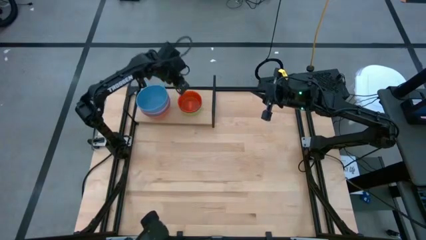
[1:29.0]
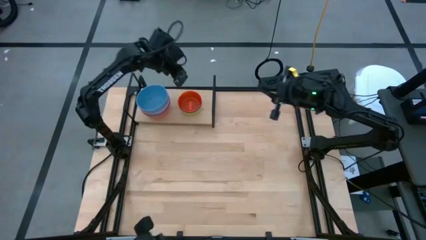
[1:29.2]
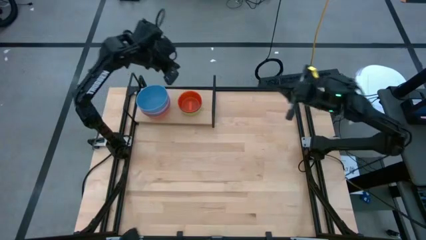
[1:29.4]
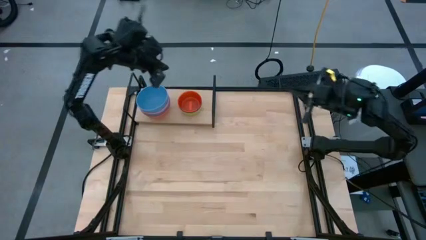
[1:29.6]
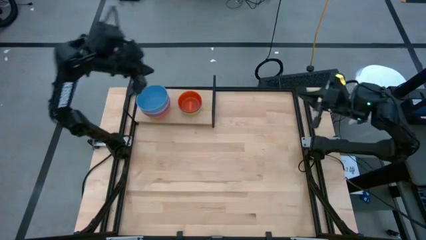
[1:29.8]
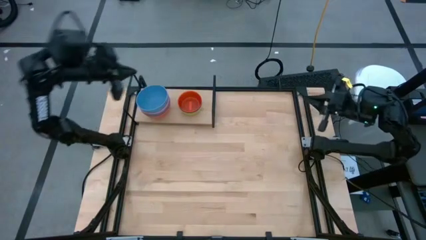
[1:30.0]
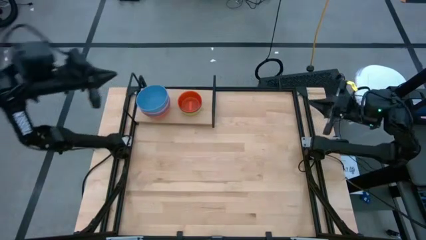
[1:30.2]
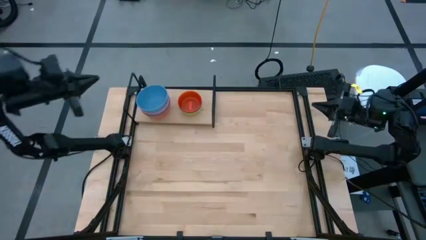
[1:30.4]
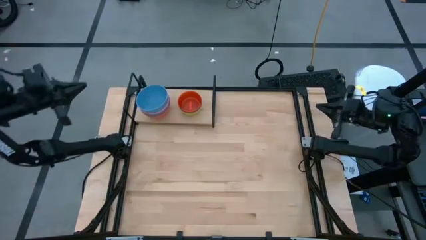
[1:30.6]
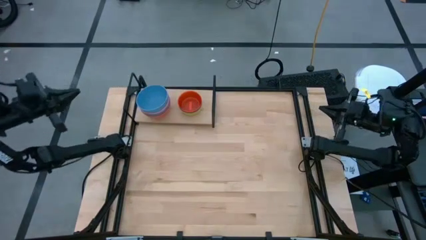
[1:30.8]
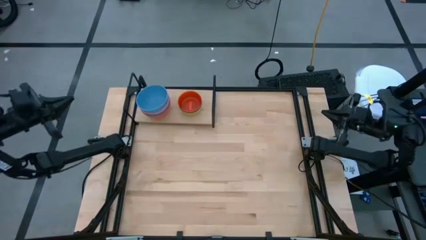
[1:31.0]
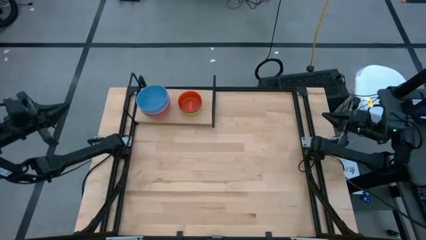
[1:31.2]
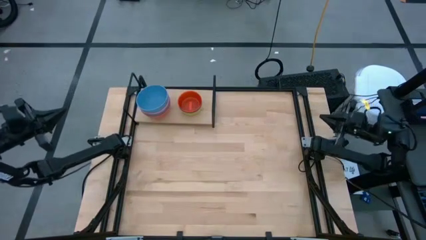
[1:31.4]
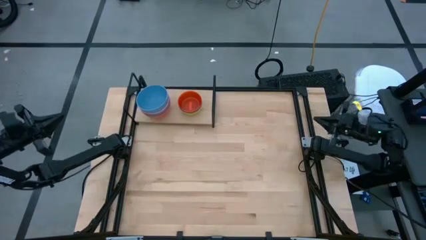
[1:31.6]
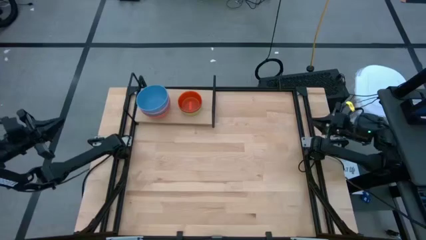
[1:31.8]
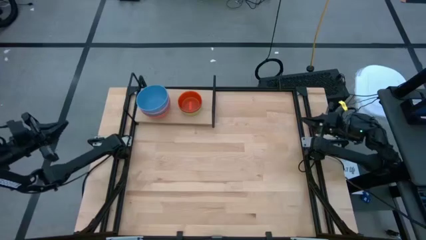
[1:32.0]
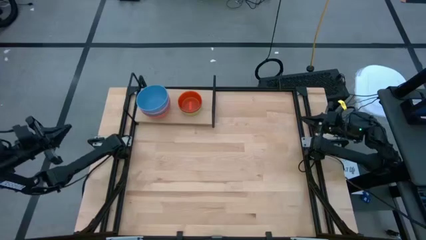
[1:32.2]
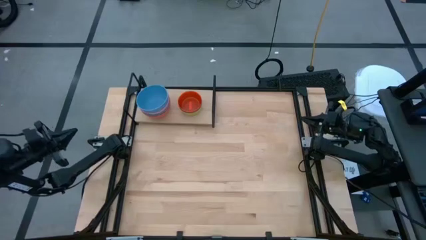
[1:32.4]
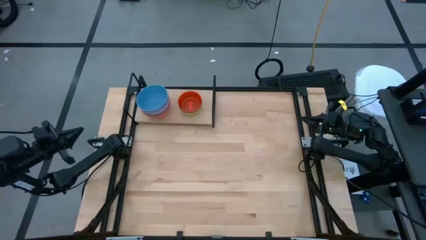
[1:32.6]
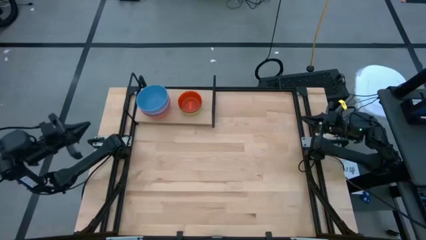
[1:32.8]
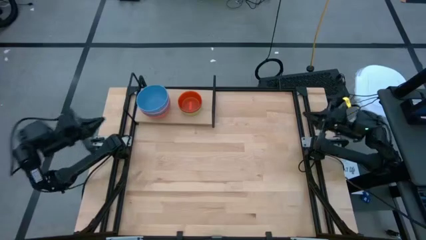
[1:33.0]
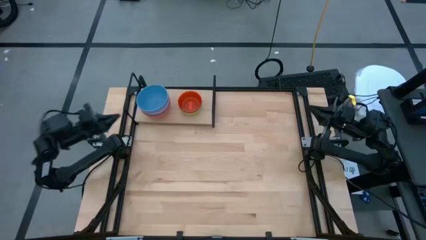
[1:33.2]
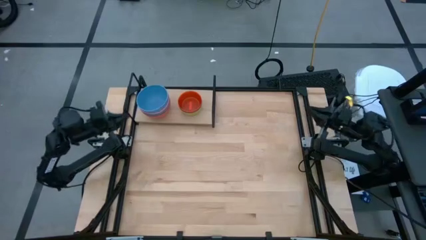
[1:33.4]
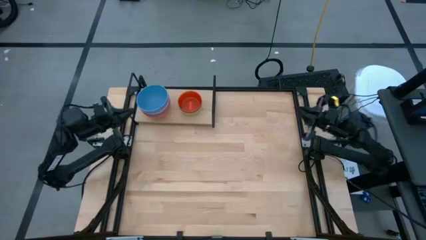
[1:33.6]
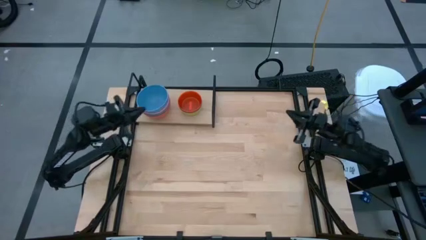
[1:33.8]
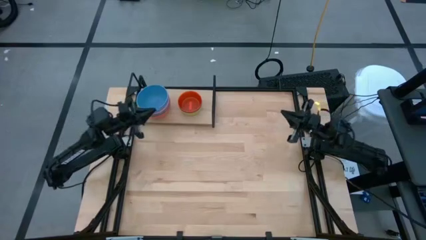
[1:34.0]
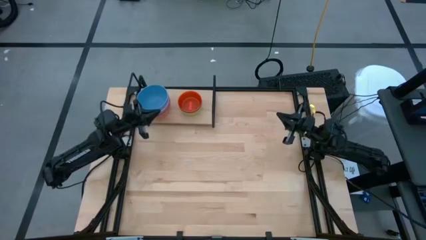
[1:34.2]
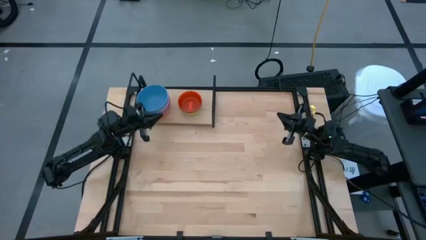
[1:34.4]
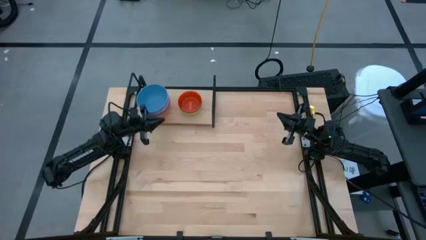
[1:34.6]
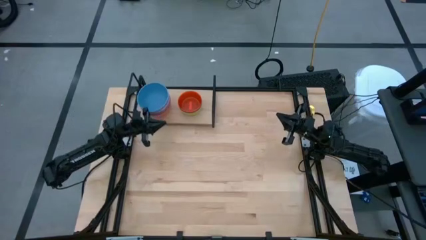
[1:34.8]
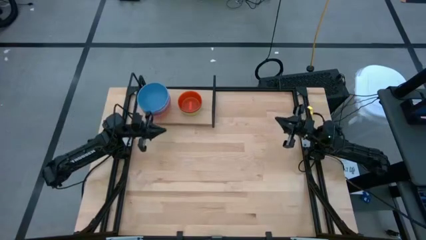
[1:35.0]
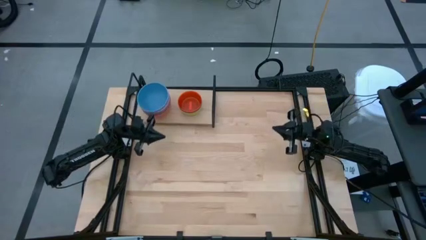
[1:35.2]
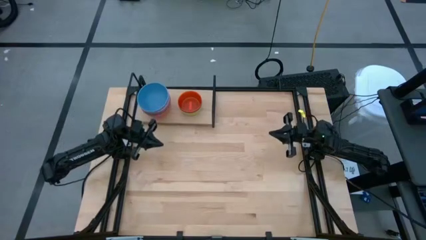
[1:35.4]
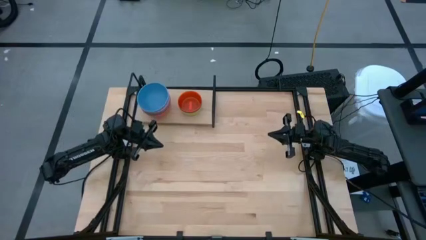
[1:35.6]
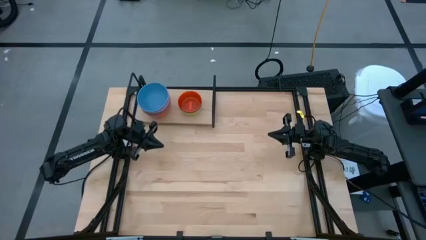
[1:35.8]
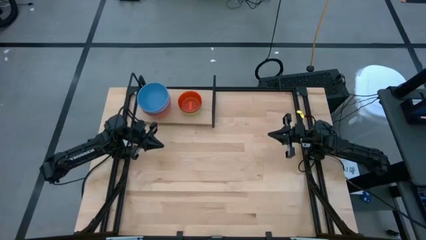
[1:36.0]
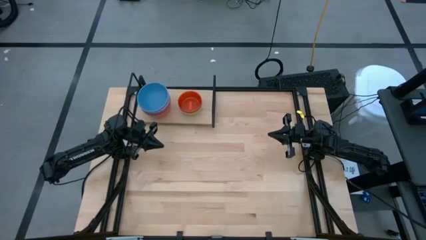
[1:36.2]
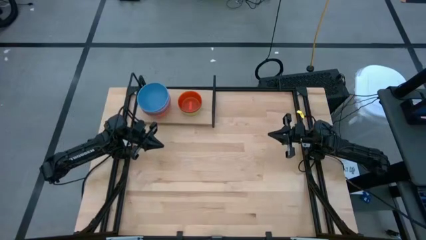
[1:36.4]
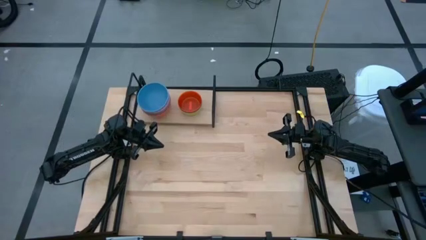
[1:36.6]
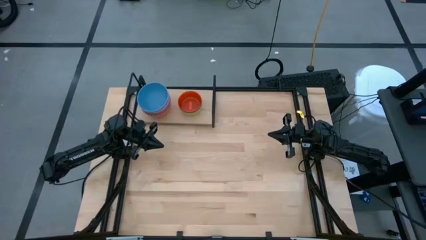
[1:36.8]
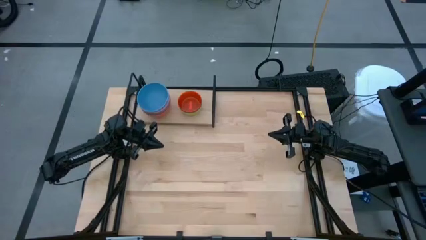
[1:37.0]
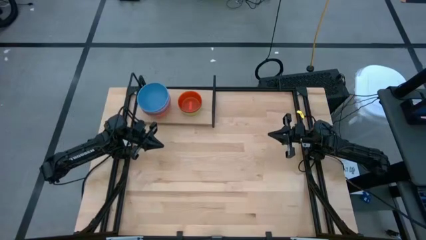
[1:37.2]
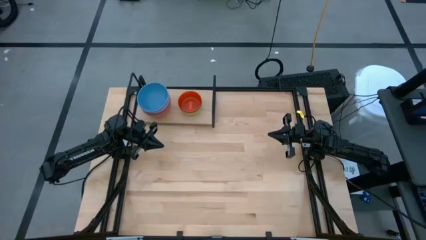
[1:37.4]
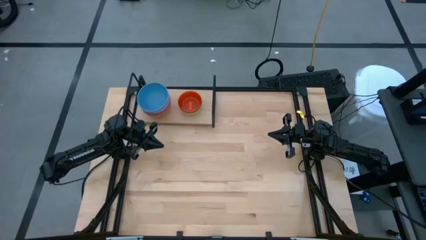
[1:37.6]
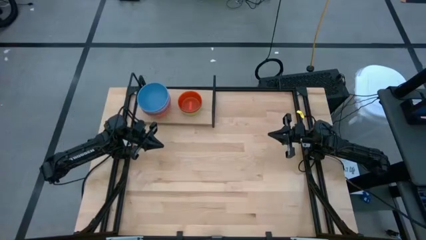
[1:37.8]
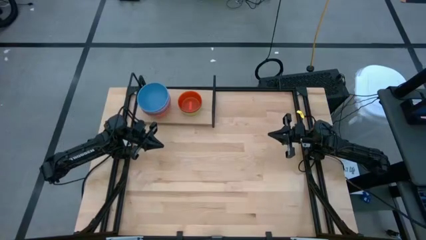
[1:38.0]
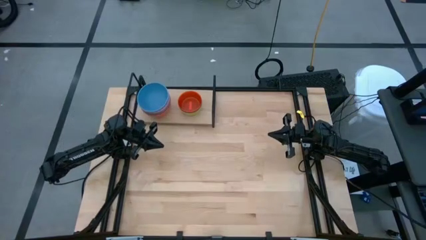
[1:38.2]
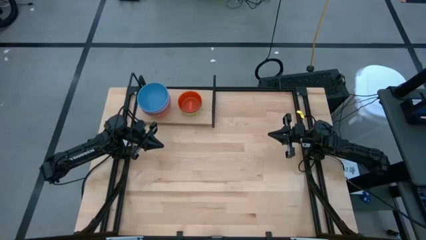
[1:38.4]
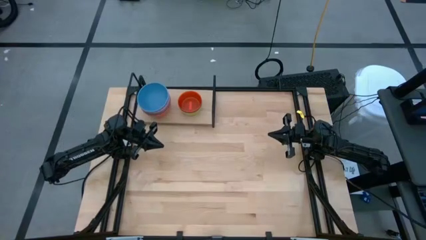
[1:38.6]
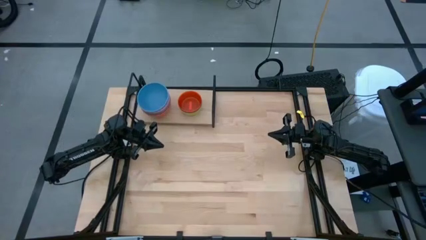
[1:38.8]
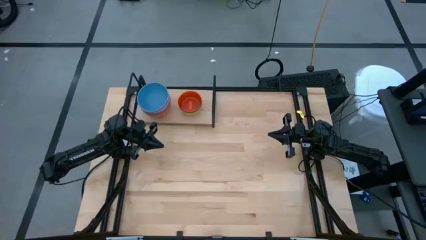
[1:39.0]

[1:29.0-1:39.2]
Task: Place and stack bowls onto a shelf
Return to Home position

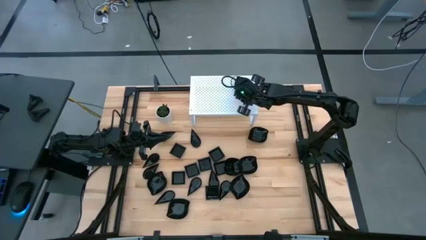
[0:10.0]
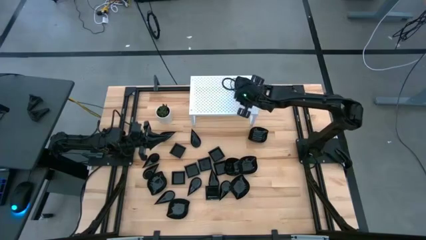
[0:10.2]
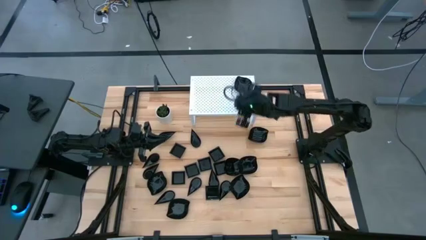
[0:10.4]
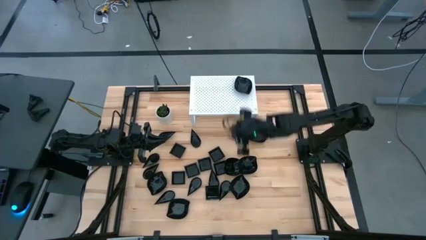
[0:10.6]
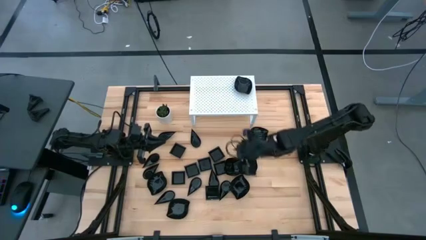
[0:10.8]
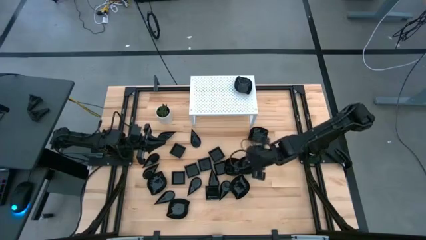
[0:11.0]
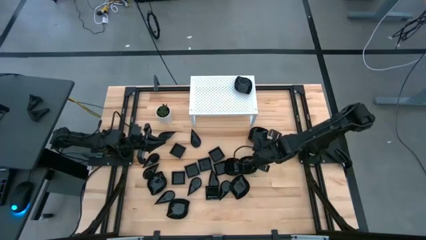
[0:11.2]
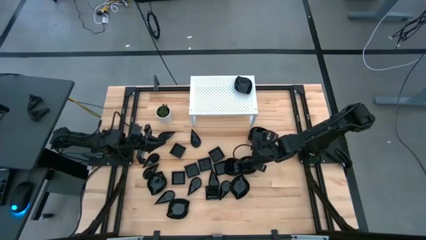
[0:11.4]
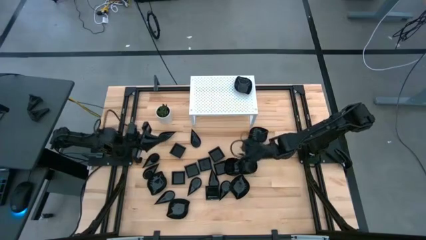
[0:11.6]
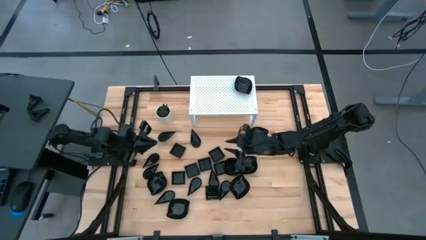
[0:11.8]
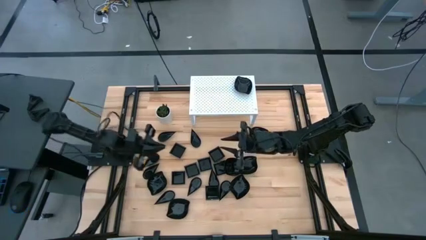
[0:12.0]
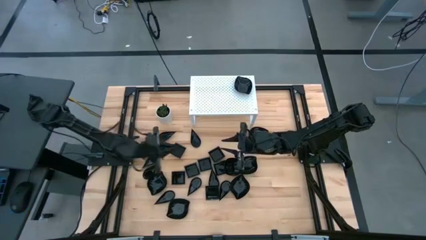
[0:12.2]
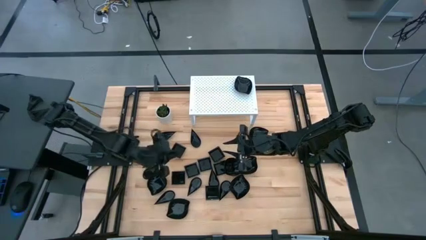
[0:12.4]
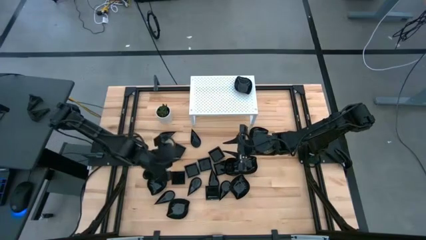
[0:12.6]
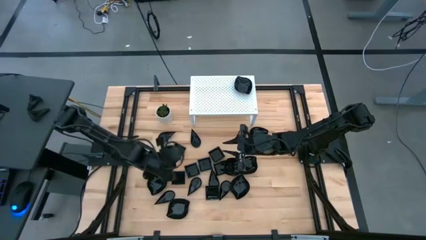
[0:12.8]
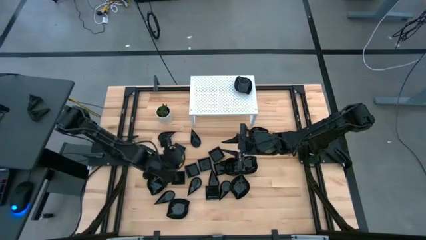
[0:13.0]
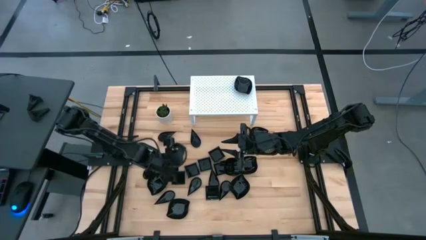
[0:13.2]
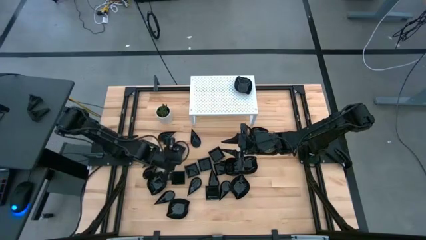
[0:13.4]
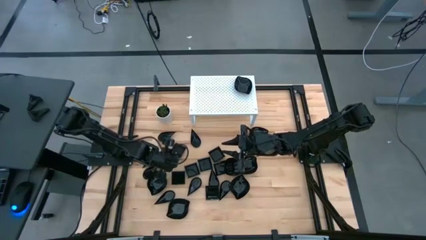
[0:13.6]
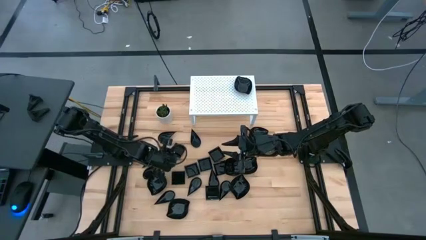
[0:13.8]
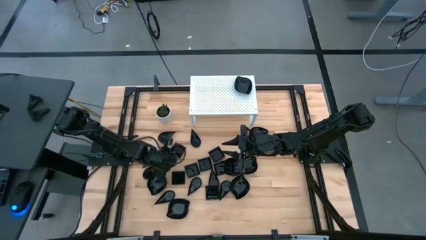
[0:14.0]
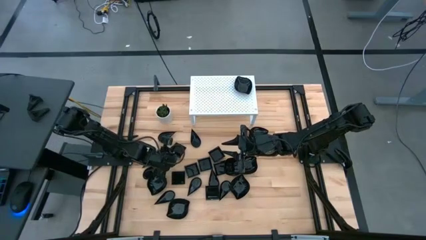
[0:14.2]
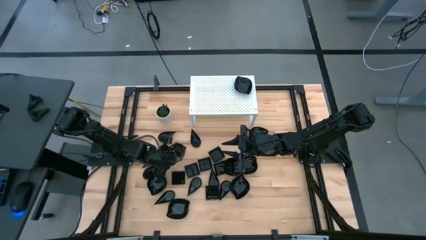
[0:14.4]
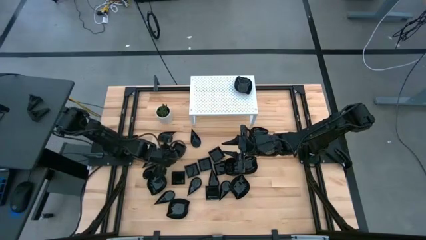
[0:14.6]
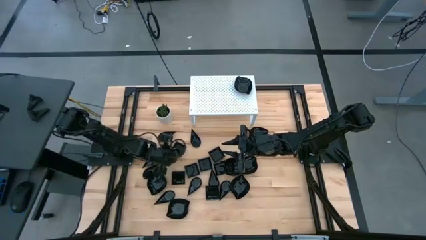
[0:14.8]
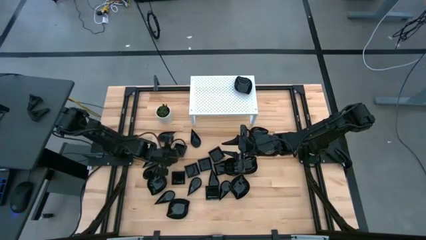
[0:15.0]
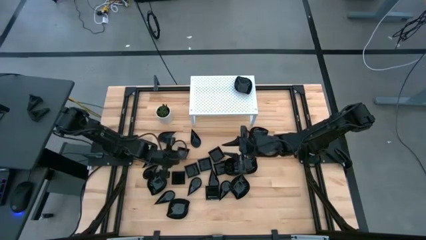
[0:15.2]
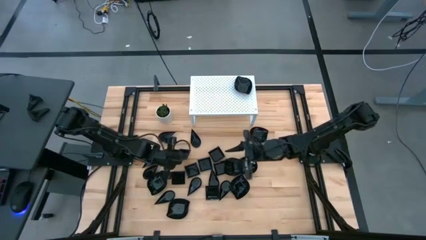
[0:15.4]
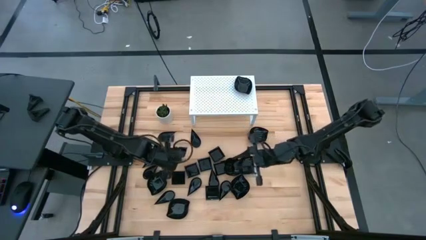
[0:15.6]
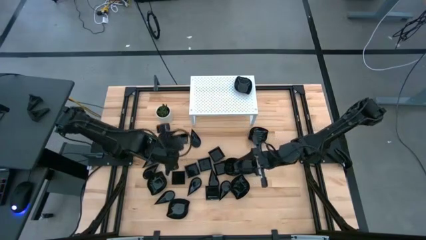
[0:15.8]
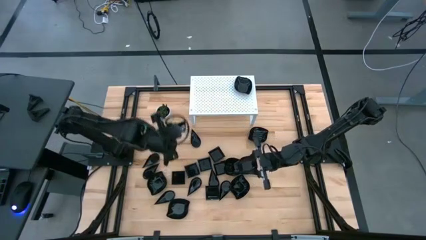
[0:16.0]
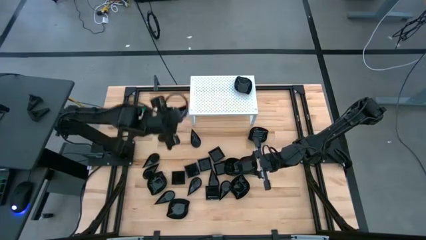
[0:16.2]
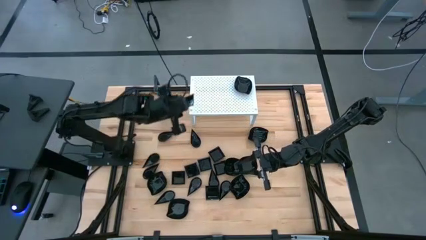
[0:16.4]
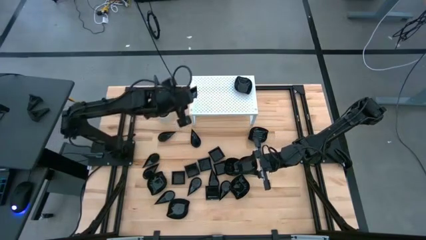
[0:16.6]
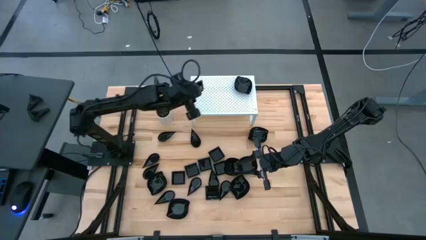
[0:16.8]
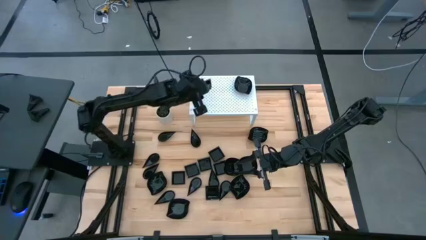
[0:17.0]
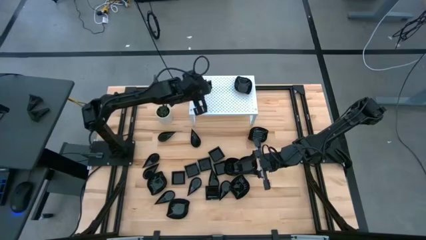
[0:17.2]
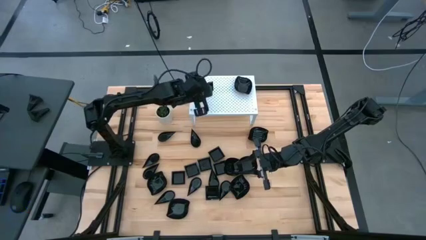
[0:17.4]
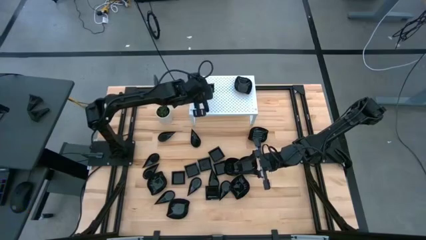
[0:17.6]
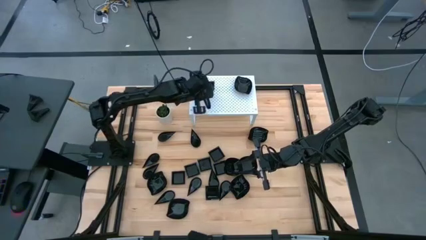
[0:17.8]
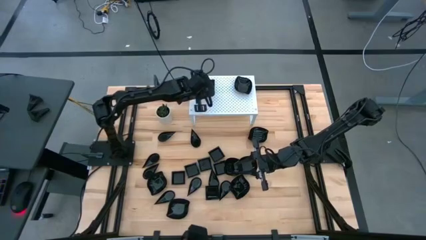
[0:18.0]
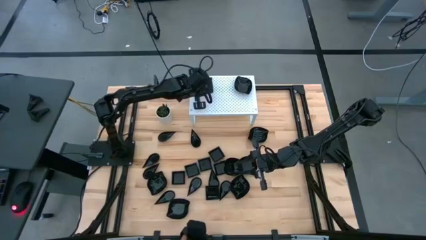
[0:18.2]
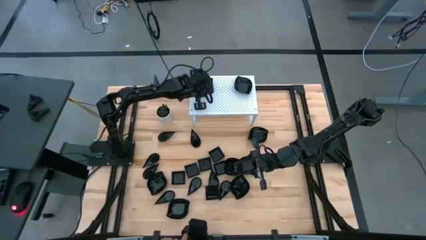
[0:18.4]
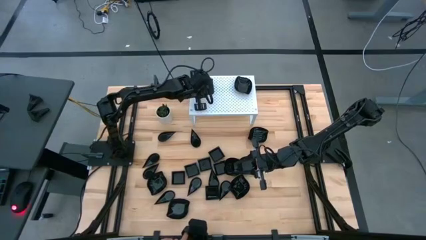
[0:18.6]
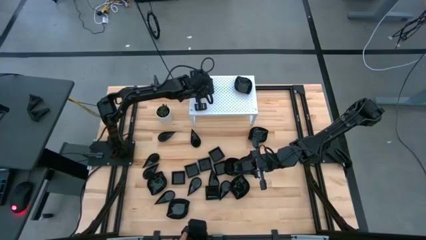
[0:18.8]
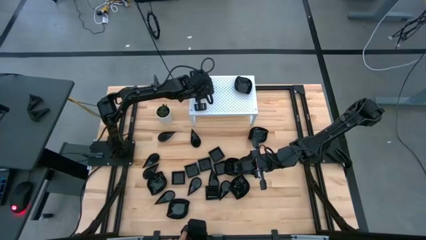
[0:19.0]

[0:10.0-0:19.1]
Task: Pick & Place Mini shaped plates
Put the black plate on the shelf
